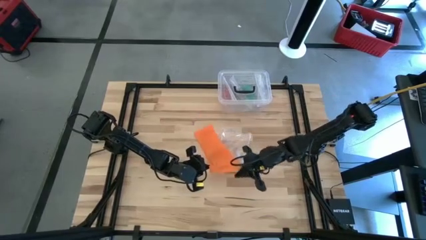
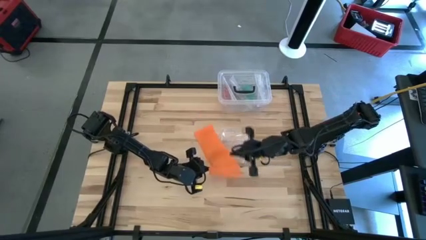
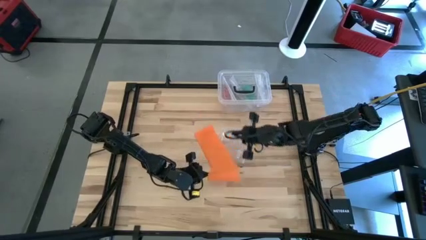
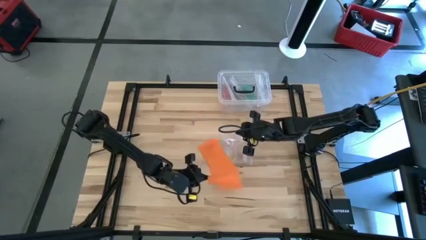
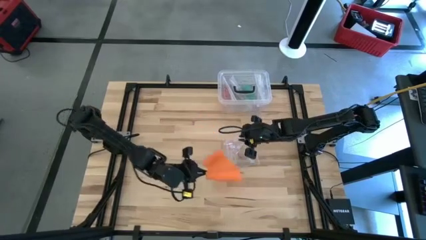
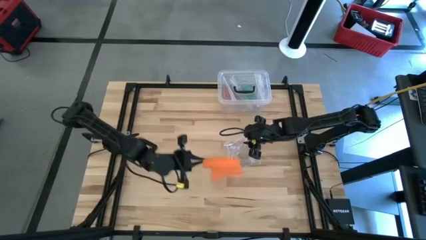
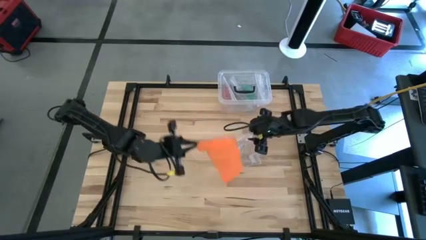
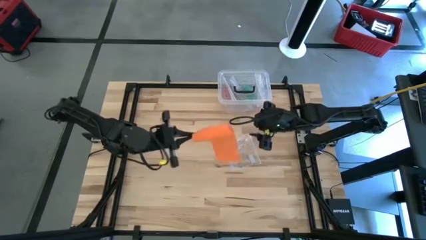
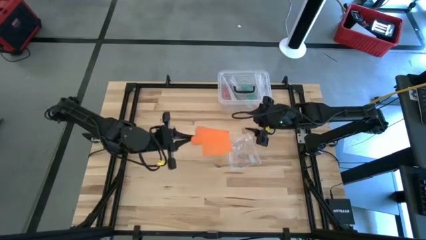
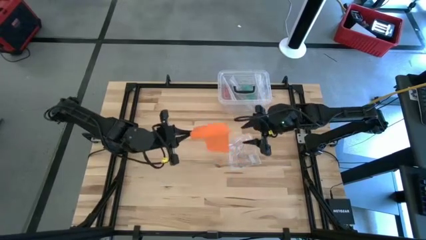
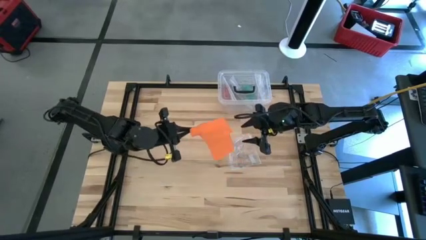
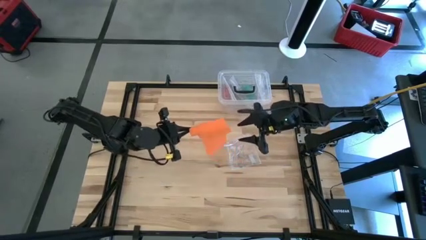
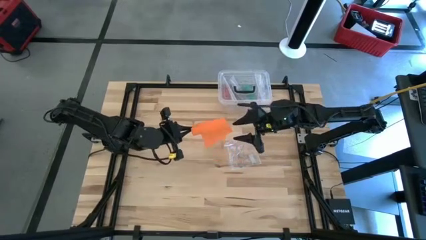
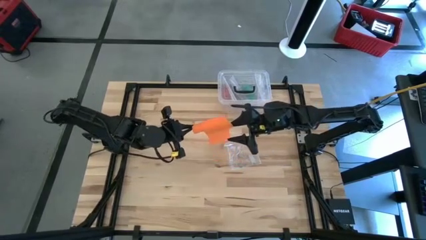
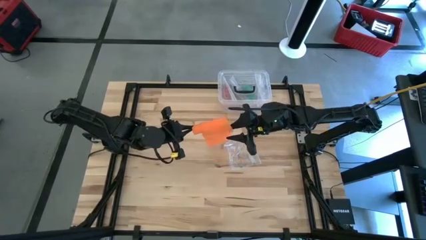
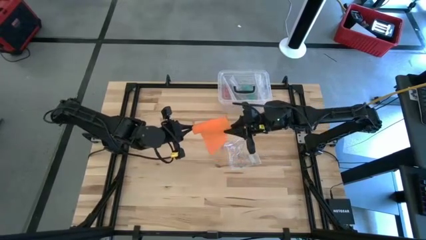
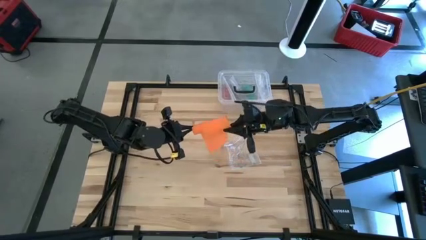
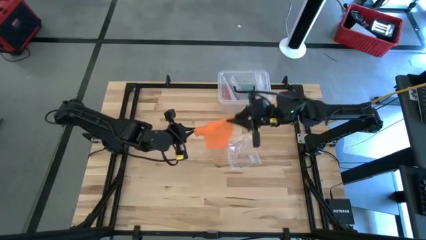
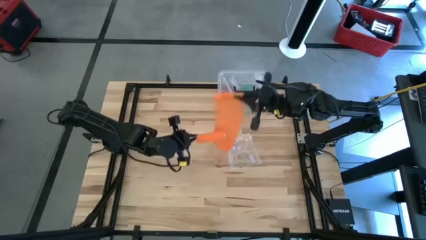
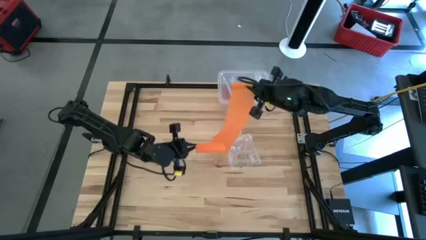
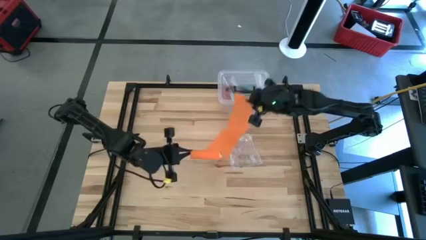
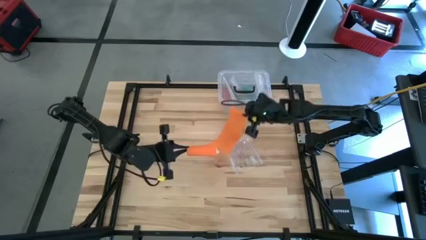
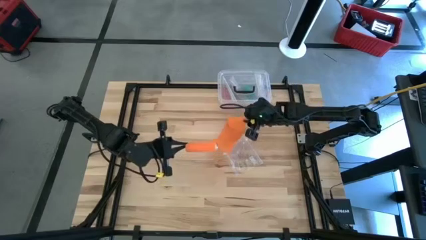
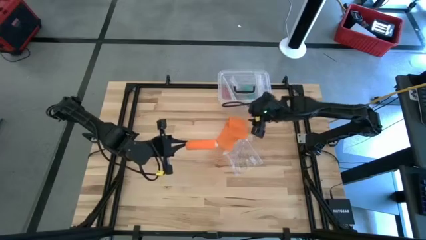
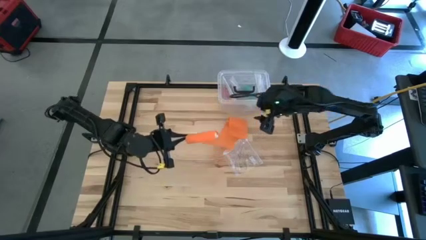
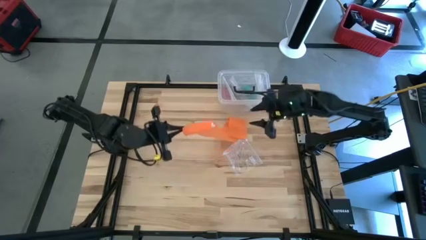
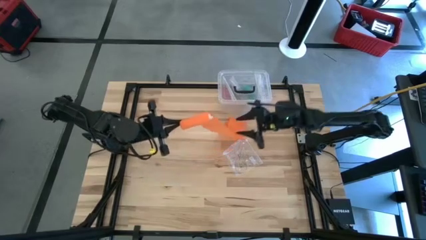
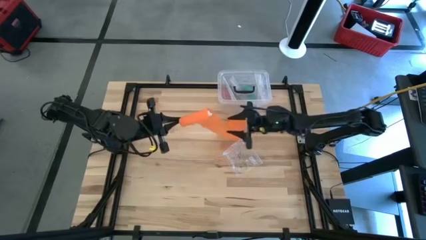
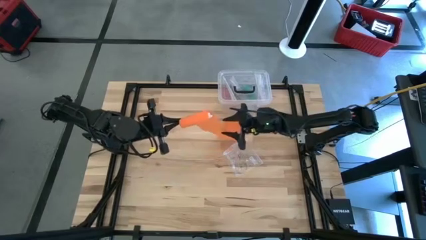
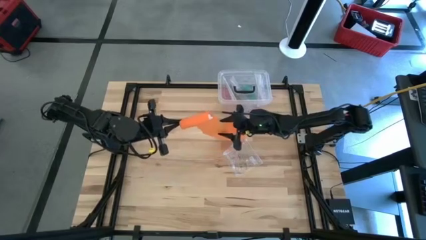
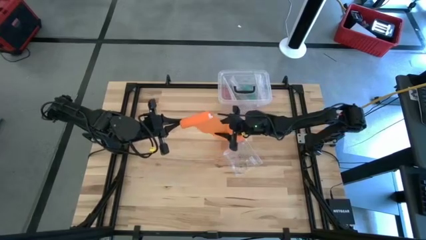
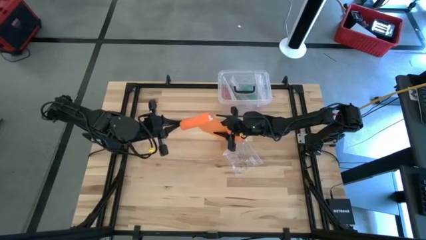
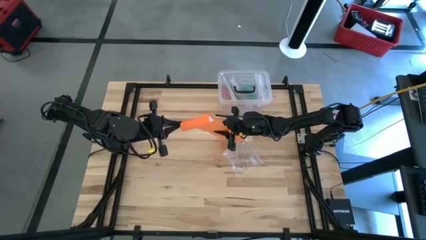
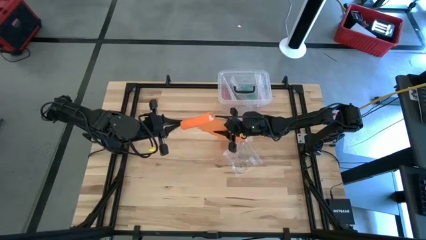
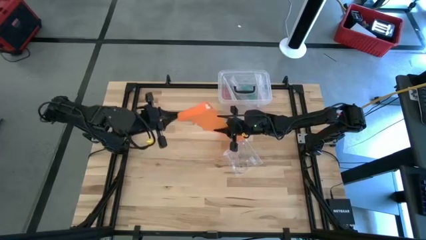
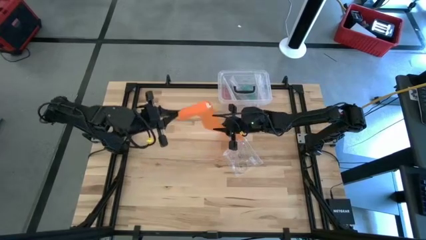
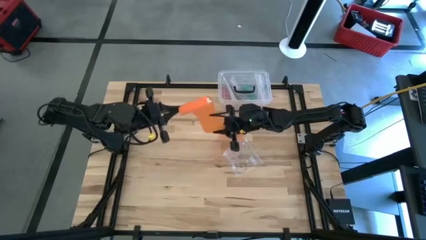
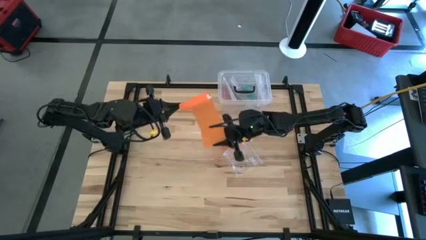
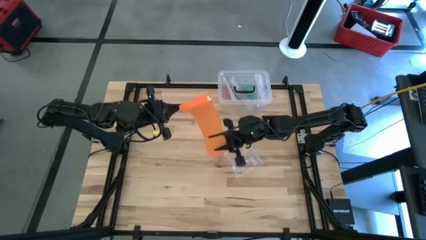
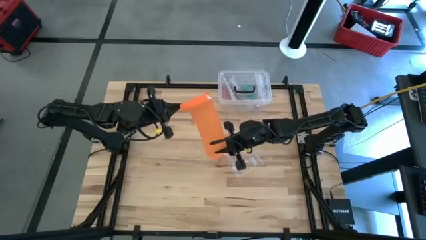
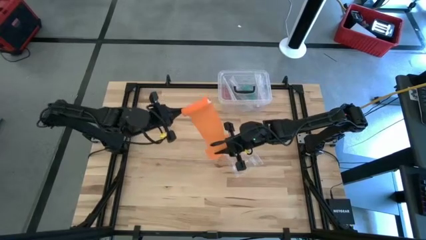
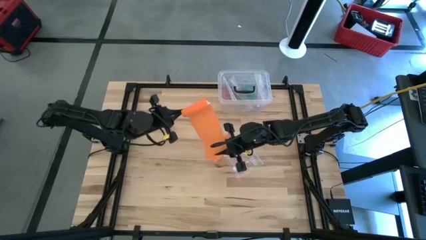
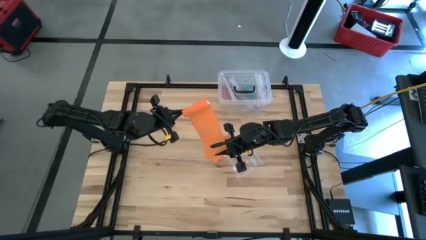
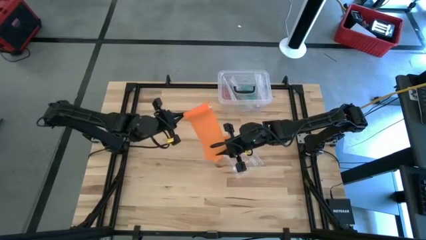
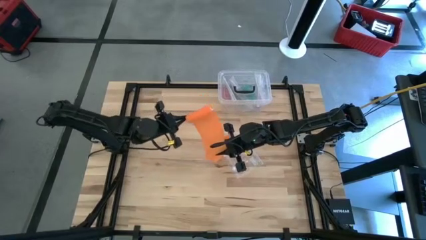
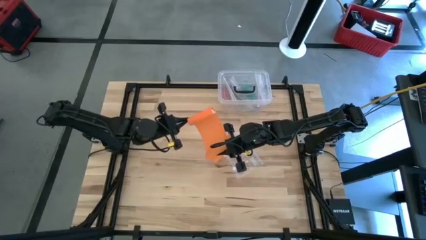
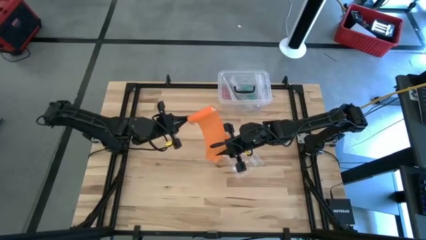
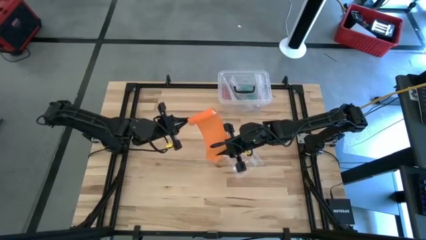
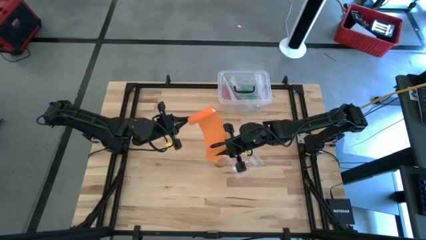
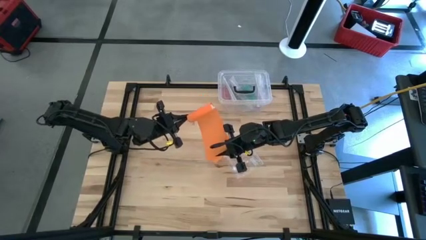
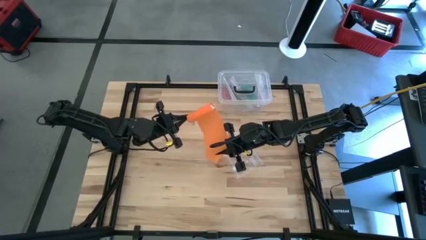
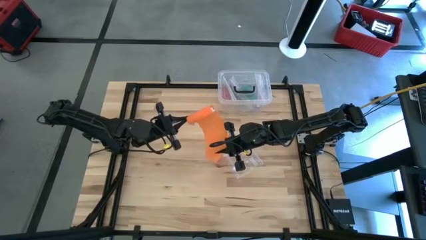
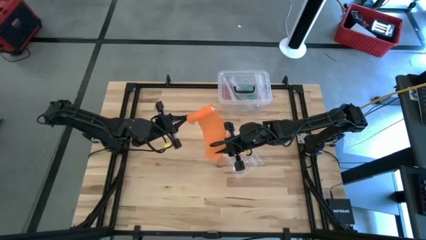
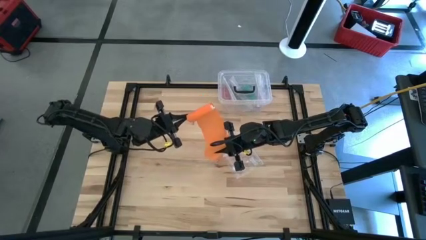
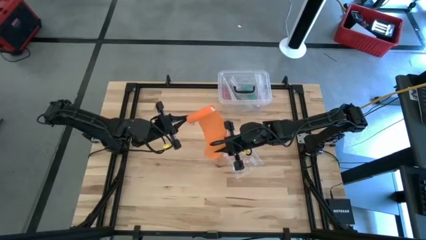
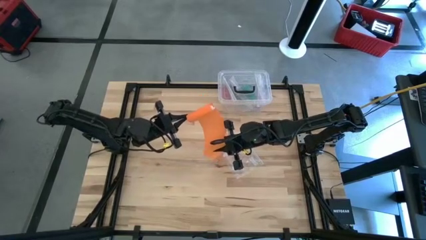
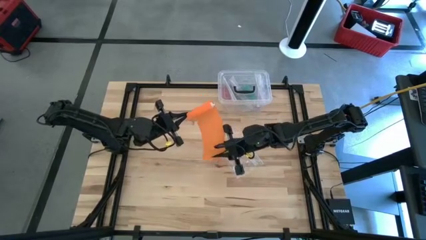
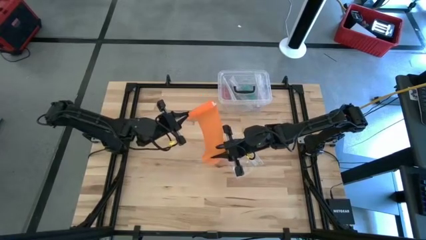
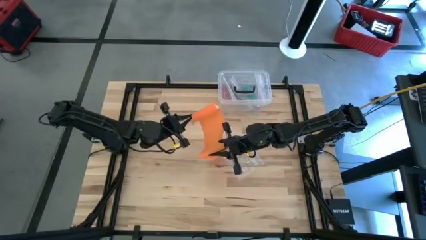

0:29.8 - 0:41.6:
Task: Roll bandage
Roll the orange bandage

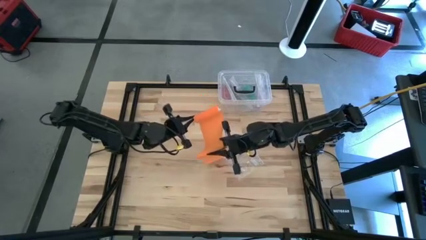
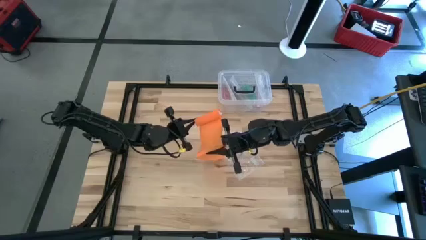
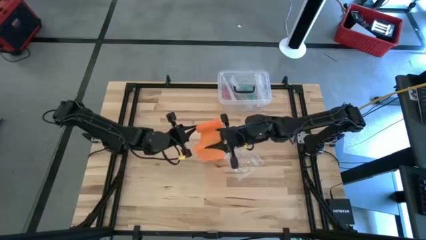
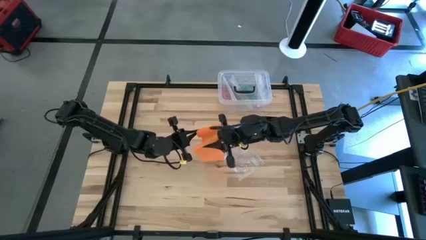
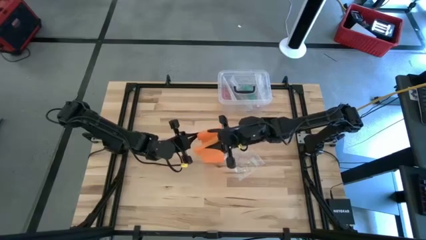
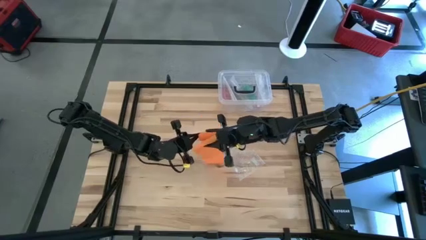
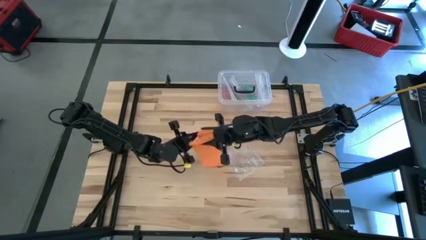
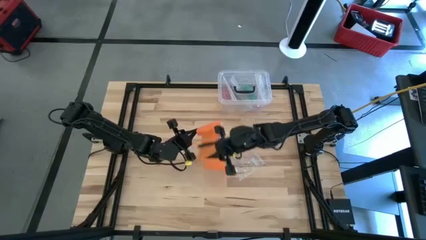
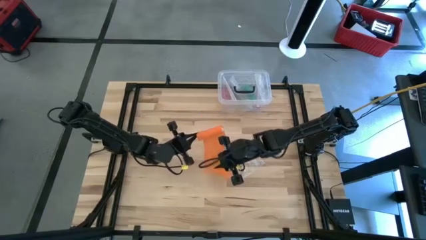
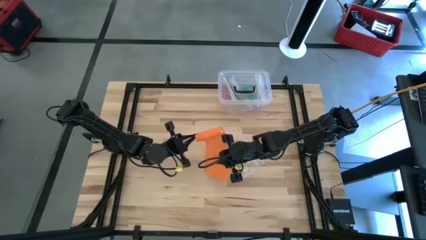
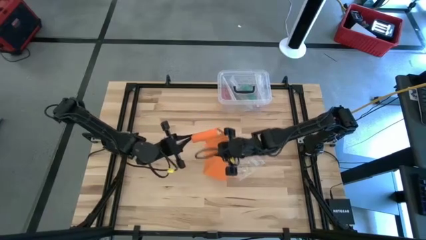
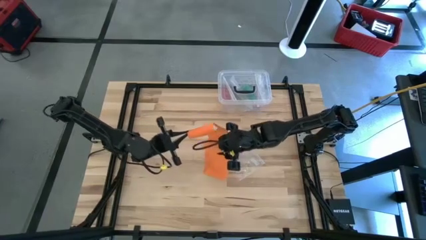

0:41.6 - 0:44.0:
Roll the orange bandage

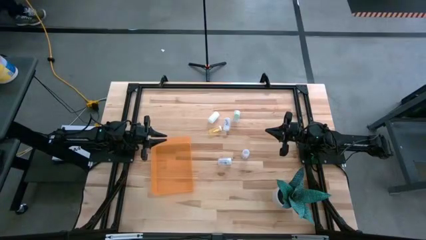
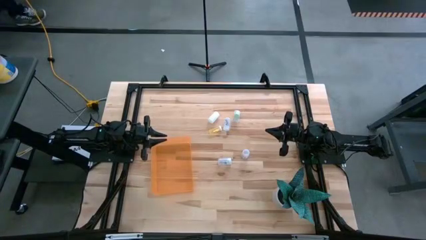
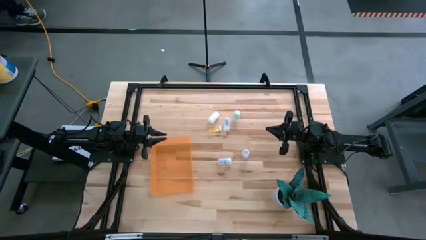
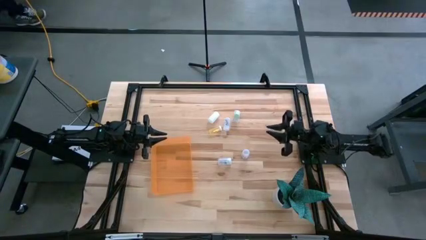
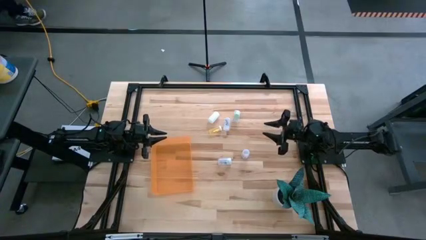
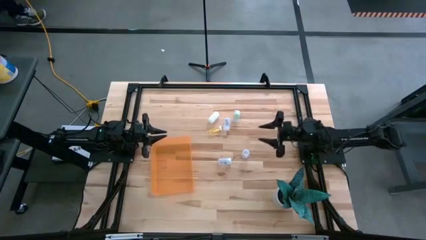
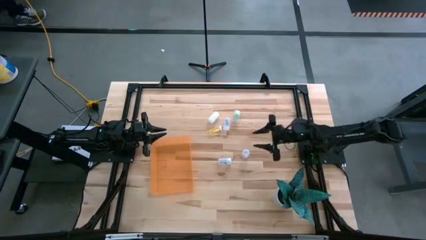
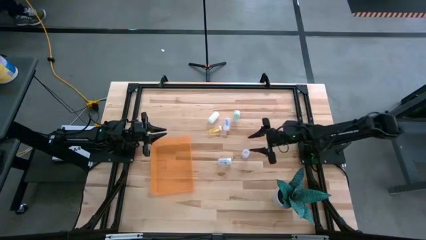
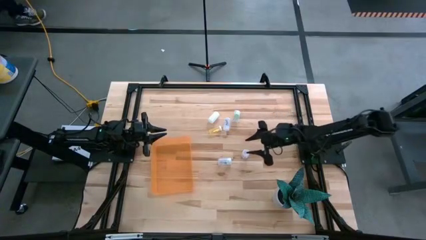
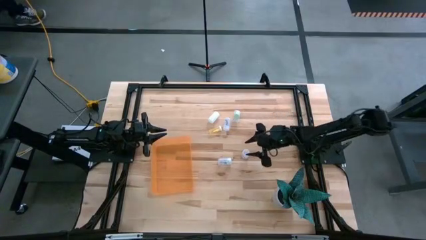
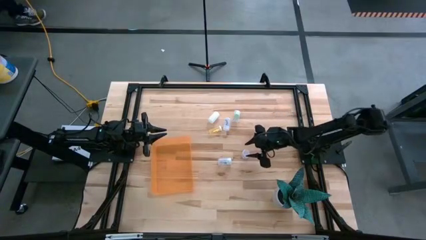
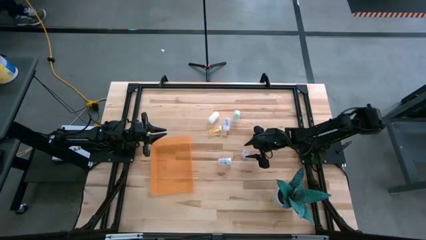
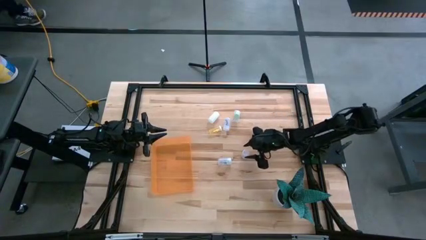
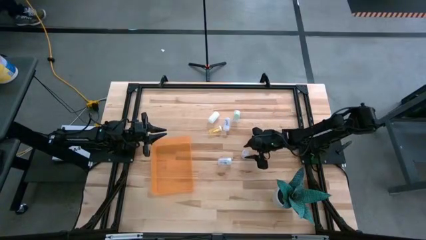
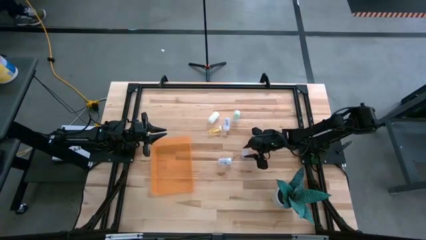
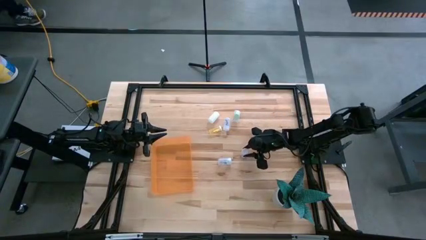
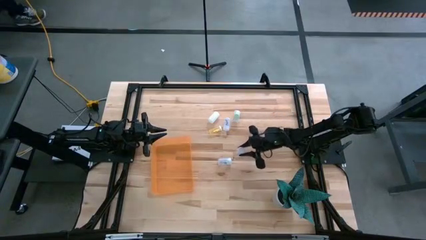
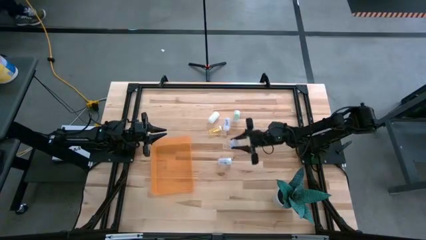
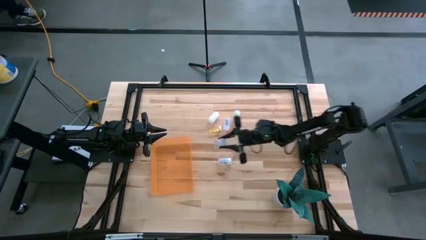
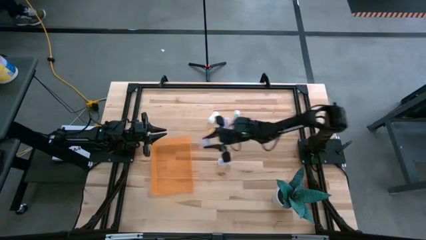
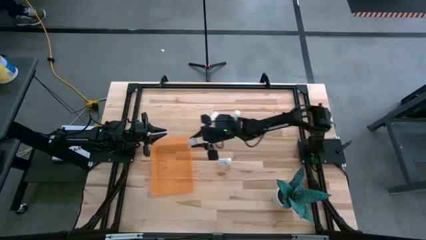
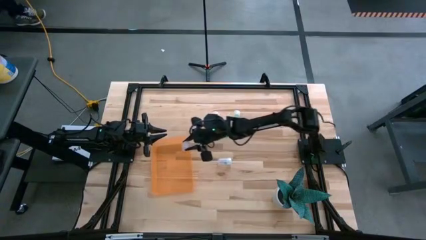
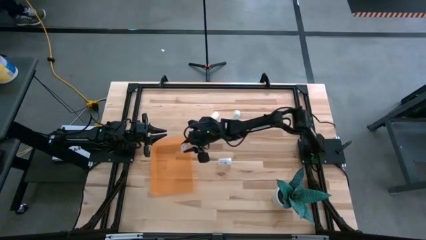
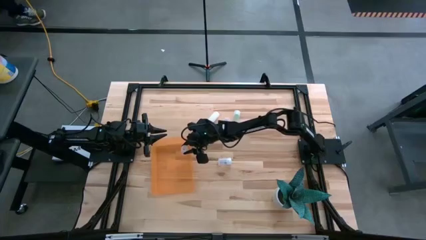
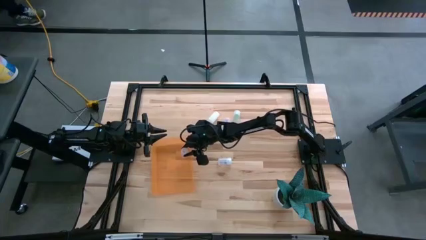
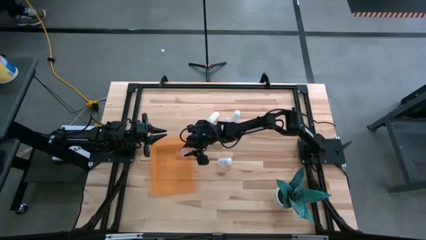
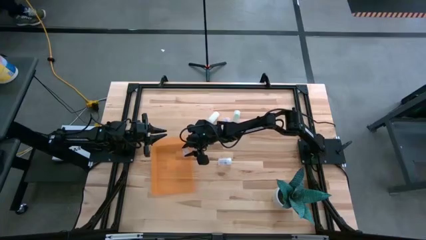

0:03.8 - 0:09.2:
Task: Pick and place pill bottles into a basket
Put the transparent pill bottle into the orange bin
